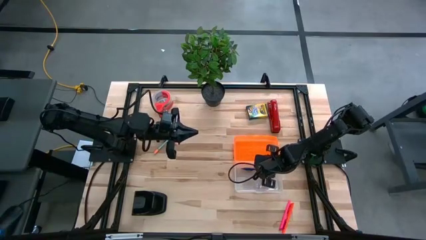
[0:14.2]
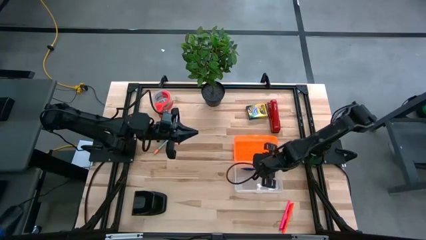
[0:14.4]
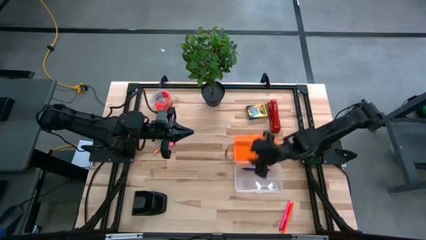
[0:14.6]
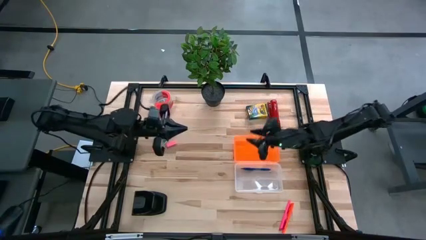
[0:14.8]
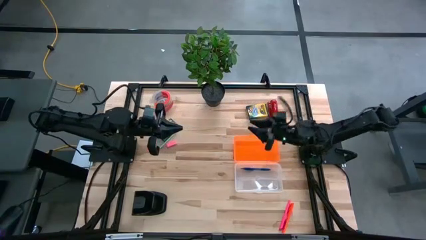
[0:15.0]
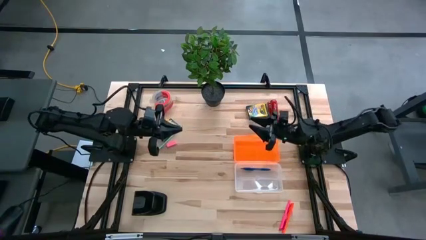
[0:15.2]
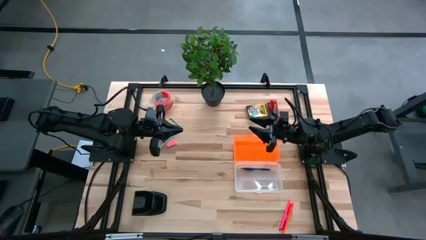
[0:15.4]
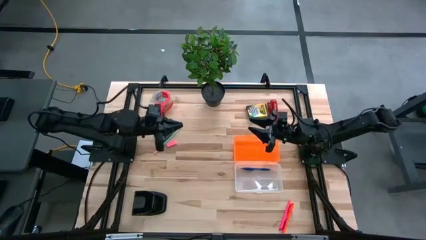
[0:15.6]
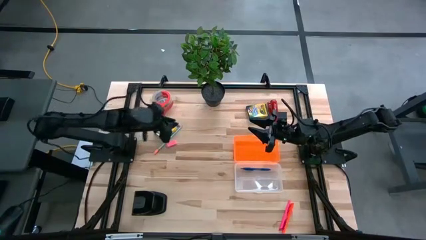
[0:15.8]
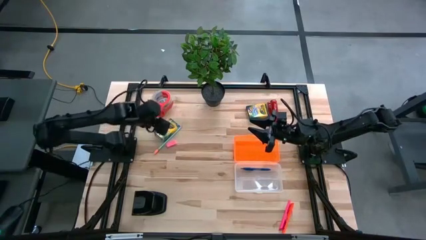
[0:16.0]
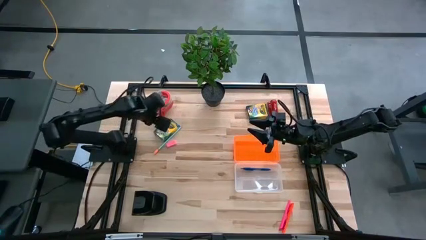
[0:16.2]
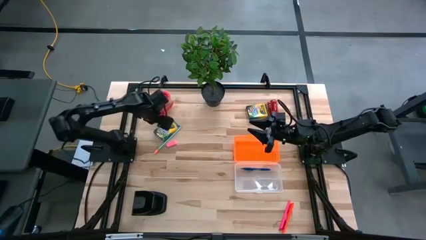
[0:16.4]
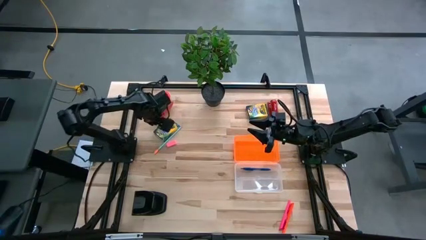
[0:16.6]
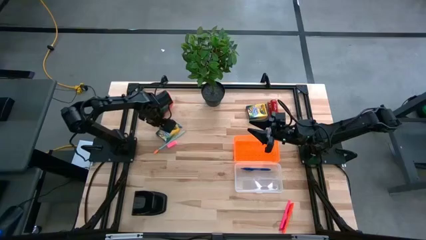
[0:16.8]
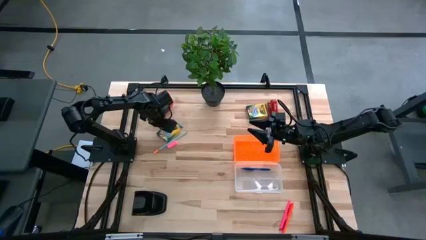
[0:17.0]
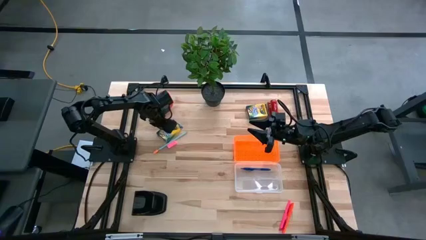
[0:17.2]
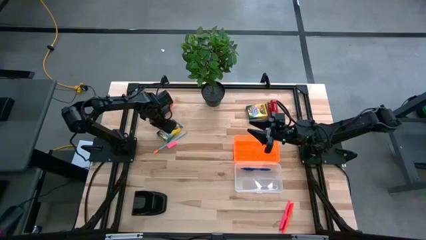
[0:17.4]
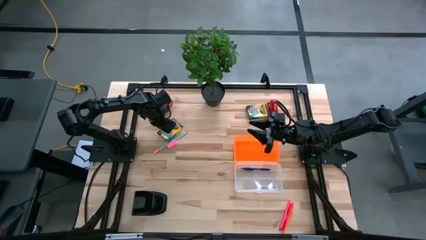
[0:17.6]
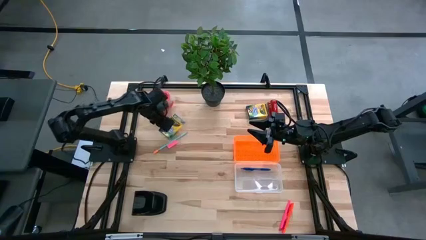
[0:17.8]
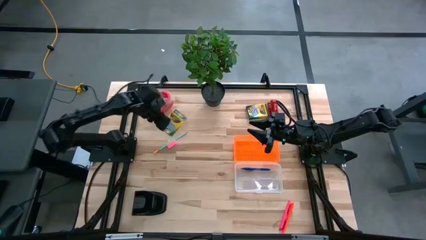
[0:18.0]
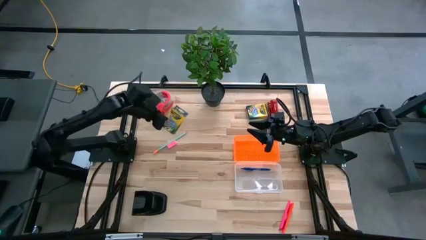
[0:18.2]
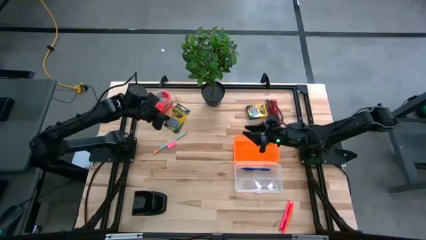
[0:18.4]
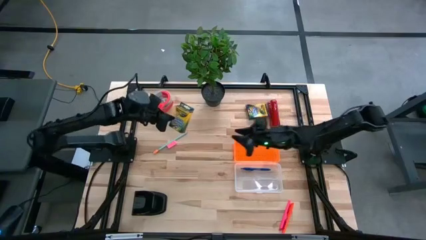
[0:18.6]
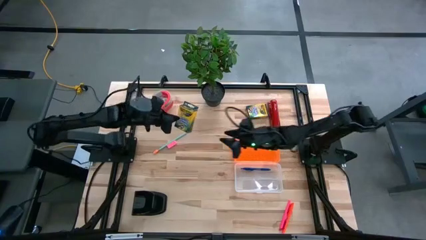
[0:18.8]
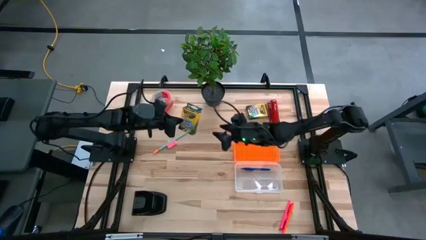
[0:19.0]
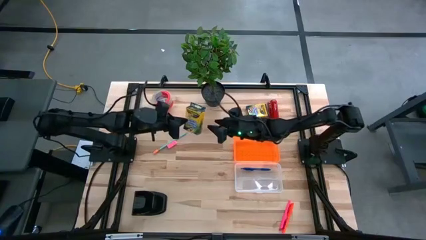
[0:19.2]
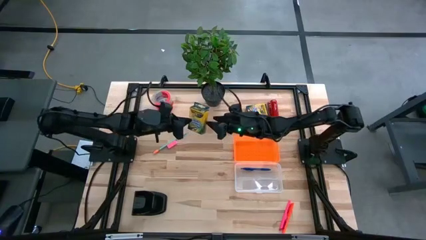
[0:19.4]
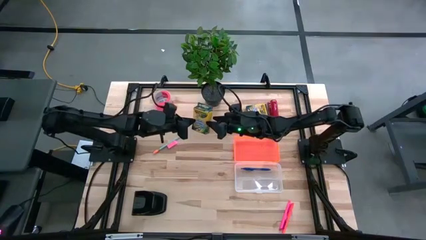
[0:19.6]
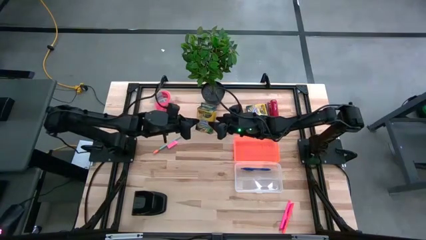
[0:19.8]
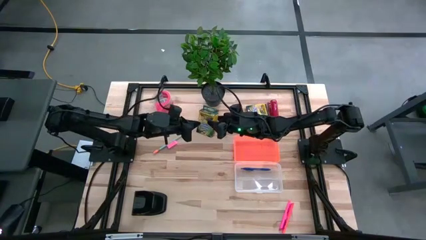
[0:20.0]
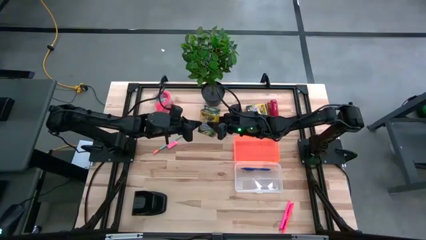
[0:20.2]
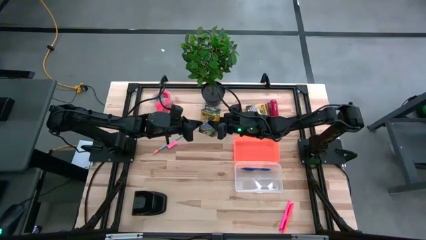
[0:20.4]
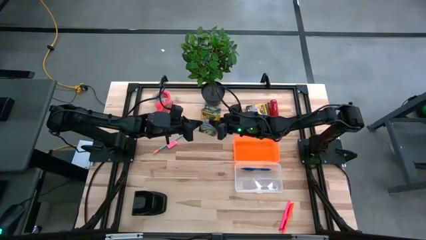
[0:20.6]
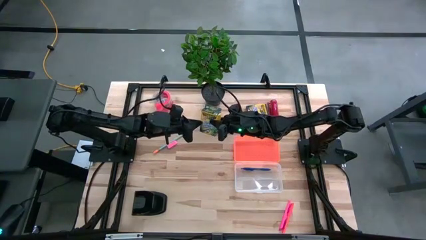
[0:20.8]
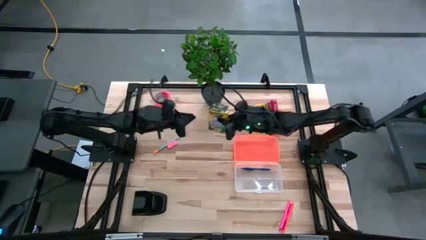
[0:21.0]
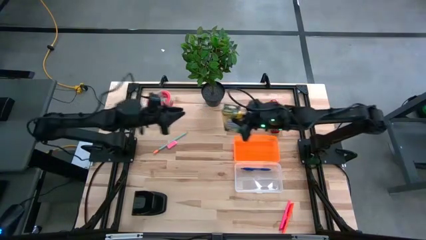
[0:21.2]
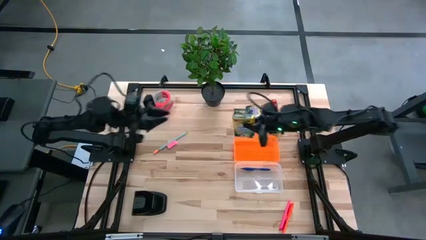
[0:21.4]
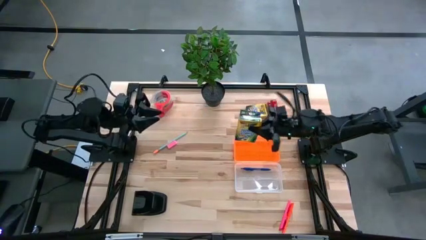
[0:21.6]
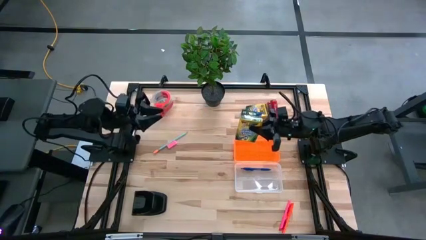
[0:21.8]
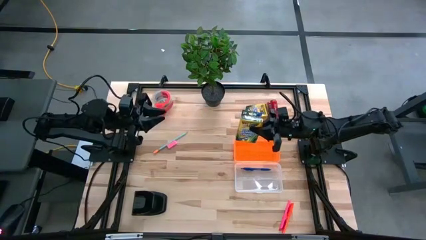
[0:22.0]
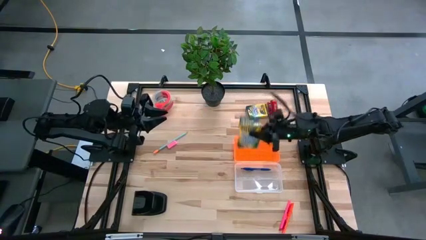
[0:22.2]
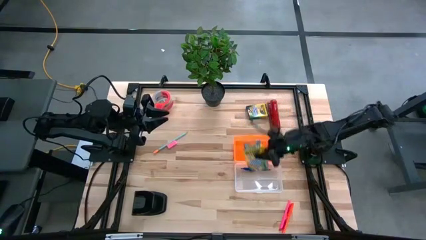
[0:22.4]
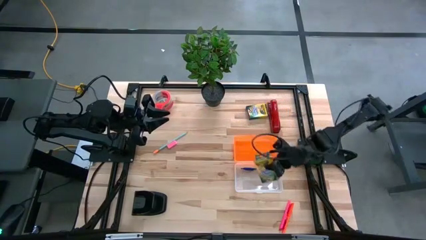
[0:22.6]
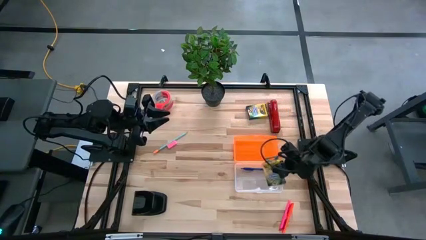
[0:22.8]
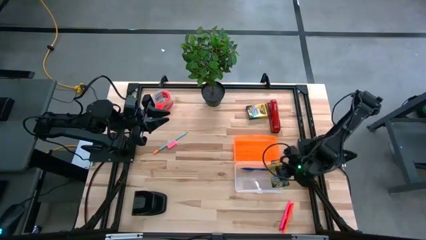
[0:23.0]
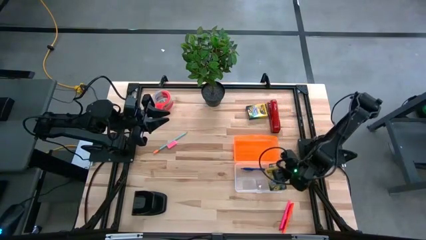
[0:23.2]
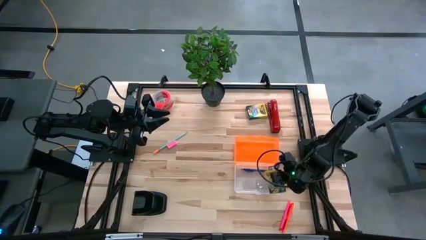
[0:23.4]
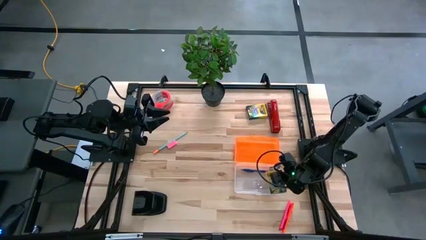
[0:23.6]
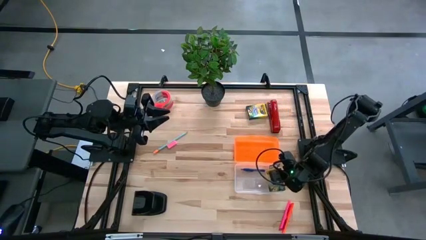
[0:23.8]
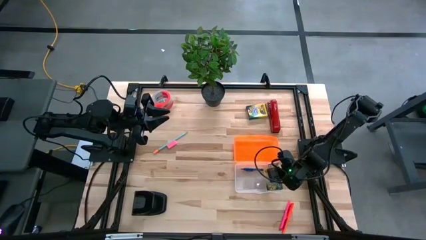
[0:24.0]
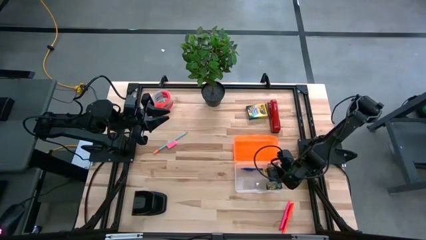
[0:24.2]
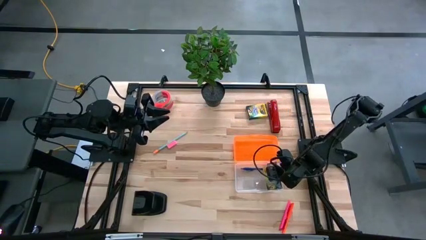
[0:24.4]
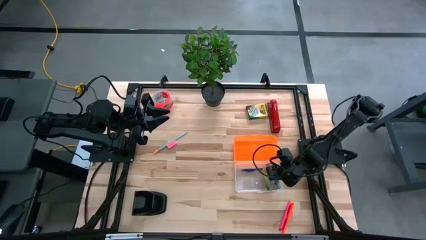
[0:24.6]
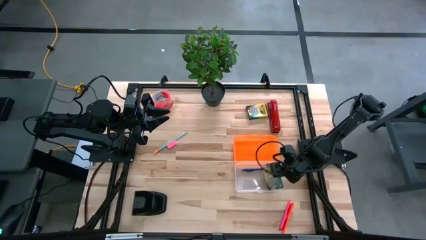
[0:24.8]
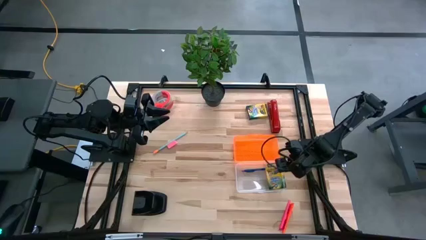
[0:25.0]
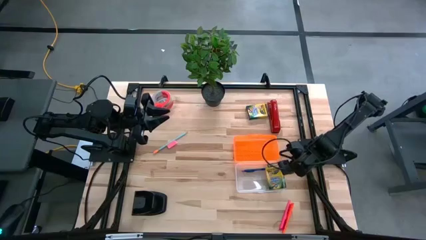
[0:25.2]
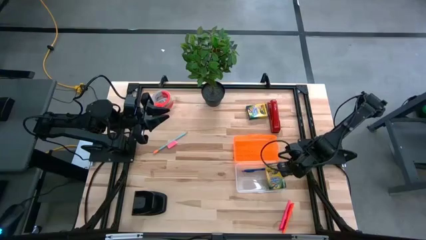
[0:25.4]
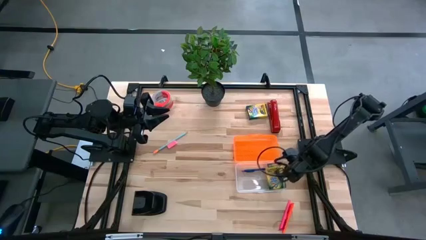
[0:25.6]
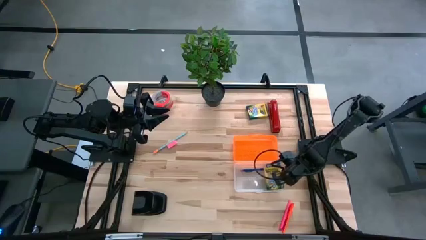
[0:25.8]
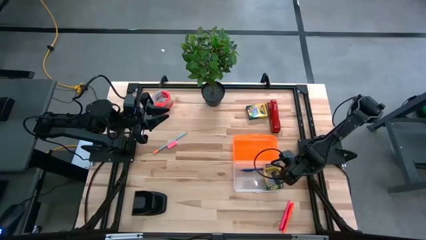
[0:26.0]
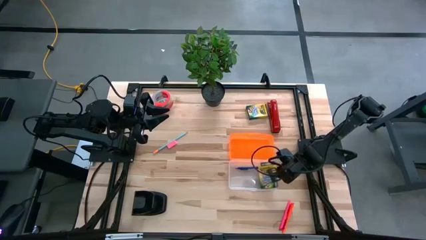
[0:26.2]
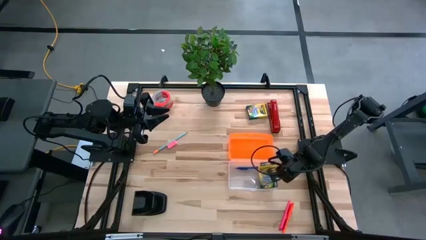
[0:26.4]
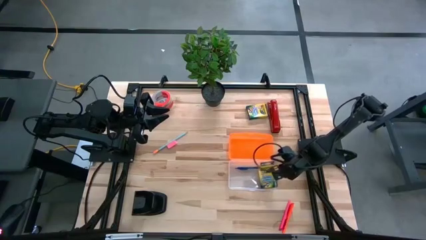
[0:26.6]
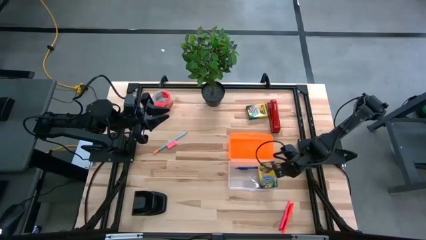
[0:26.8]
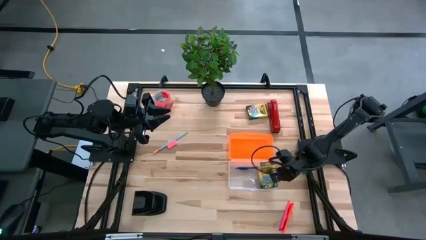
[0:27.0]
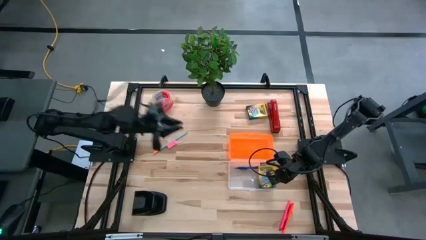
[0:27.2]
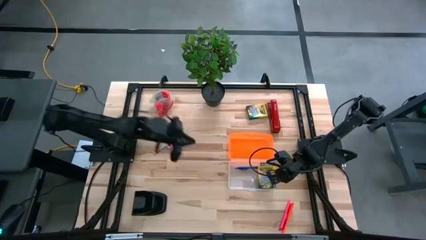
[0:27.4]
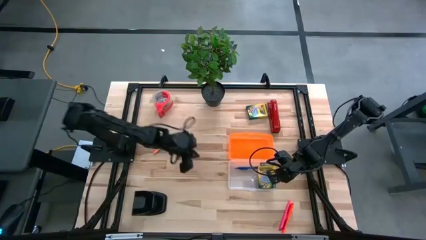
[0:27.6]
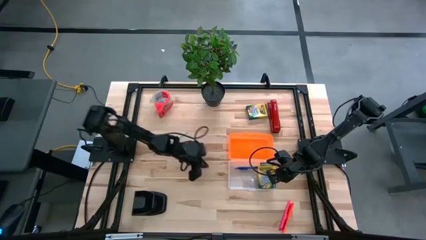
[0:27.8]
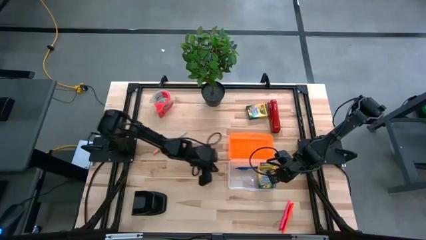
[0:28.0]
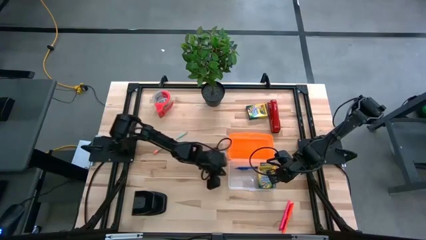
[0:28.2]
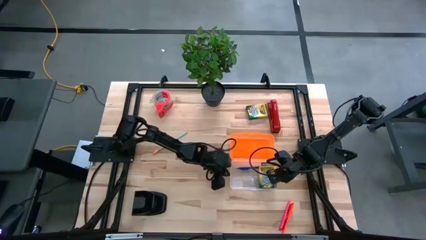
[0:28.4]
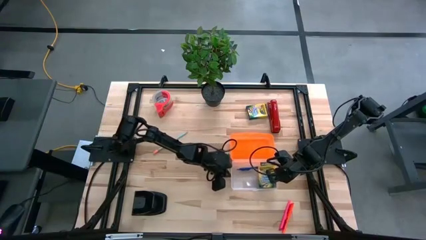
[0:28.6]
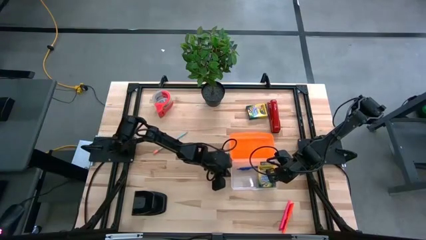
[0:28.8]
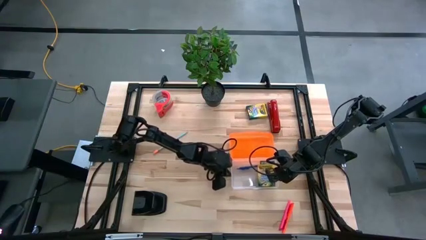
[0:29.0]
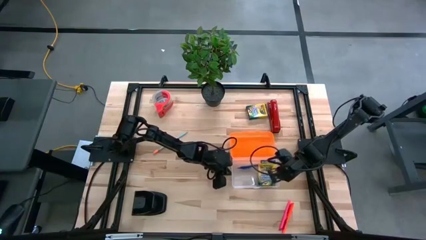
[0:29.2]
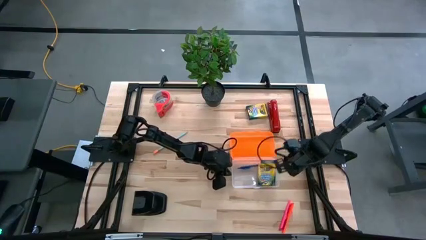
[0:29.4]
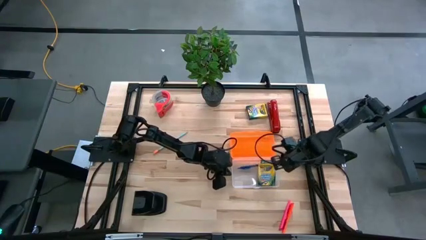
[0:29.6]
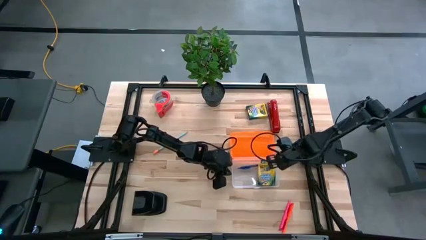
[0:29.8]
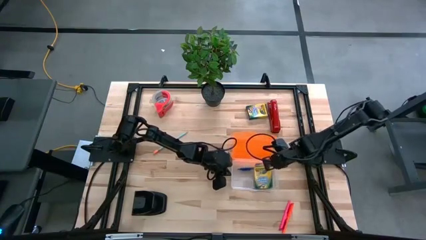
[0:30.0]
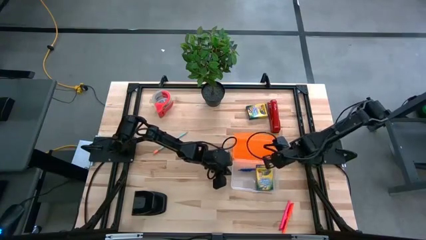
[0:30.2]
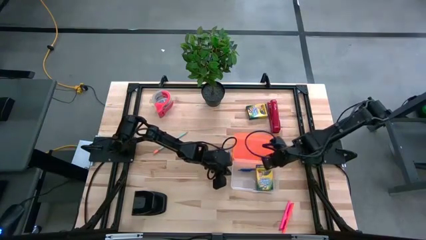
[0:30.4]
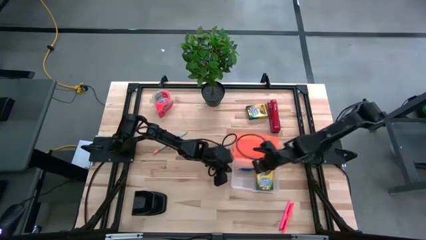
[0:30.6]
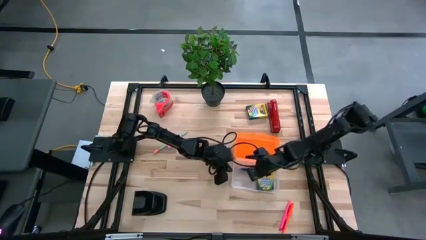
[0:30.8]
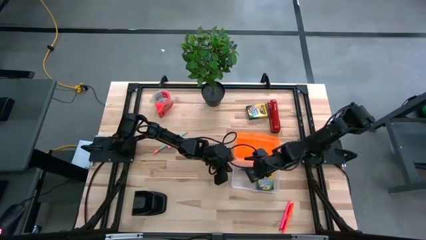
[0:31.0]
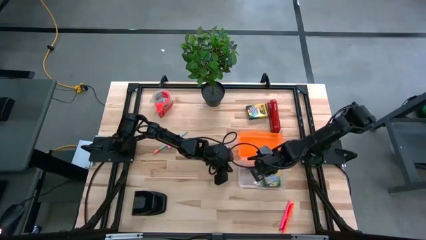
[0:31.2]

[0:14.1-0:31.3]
Task: Pack school essentials
Put the left orange crayon box into the orange supply box
